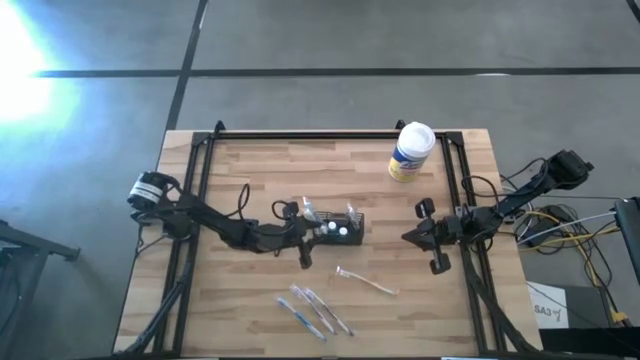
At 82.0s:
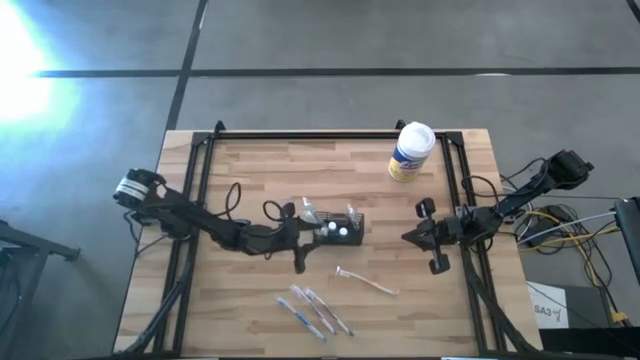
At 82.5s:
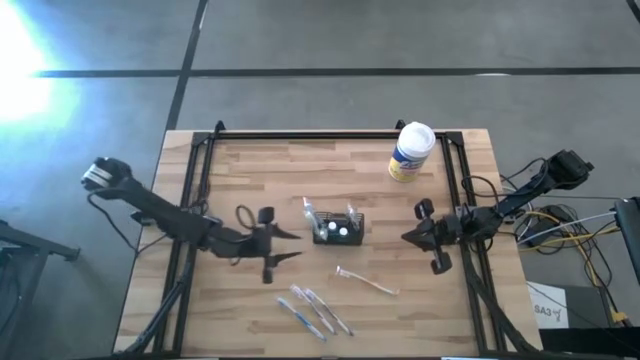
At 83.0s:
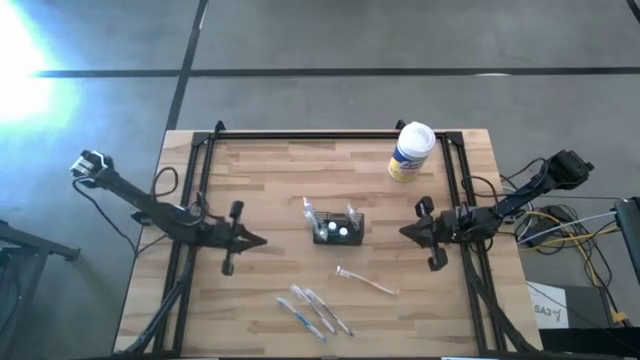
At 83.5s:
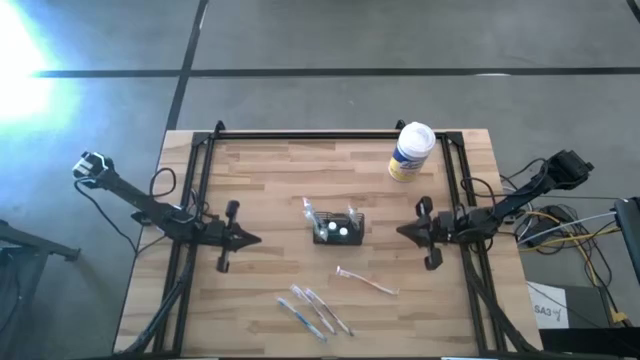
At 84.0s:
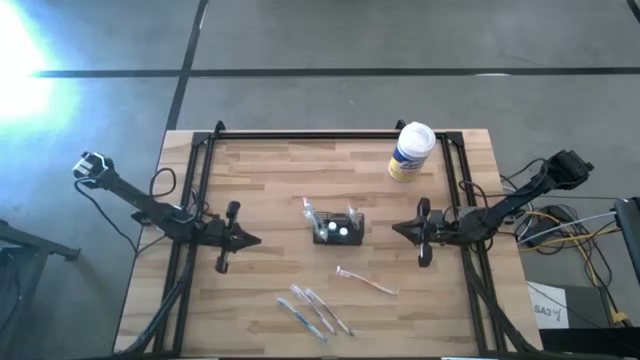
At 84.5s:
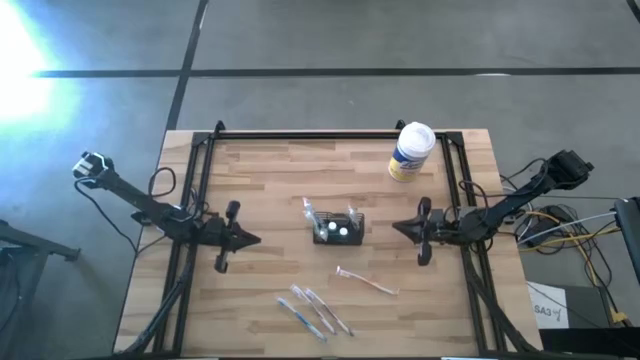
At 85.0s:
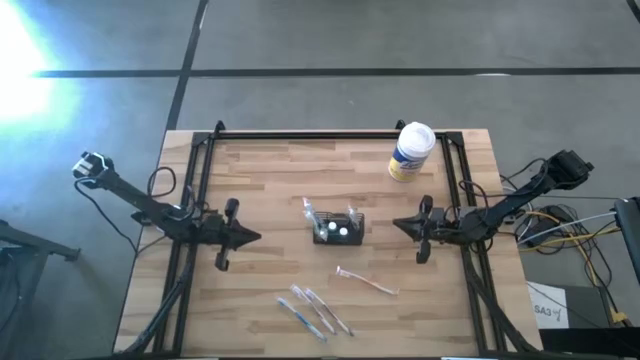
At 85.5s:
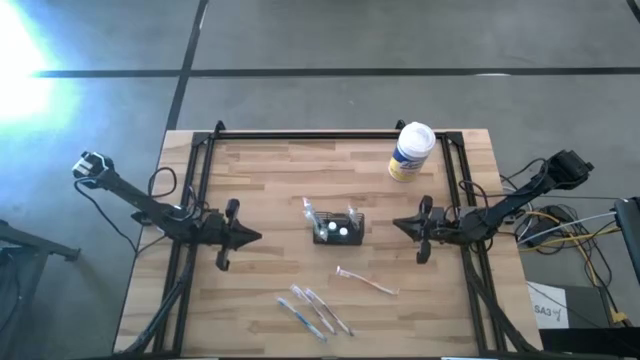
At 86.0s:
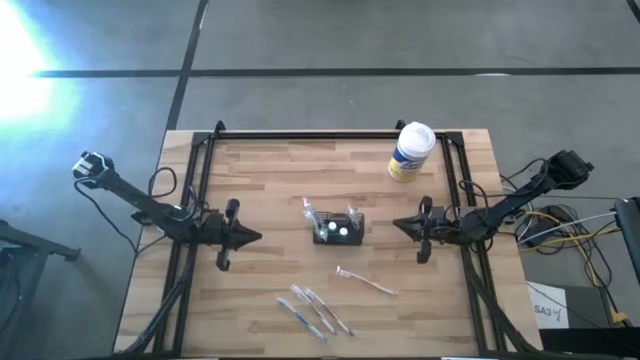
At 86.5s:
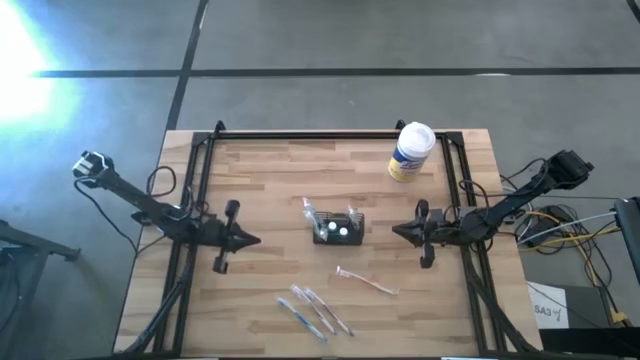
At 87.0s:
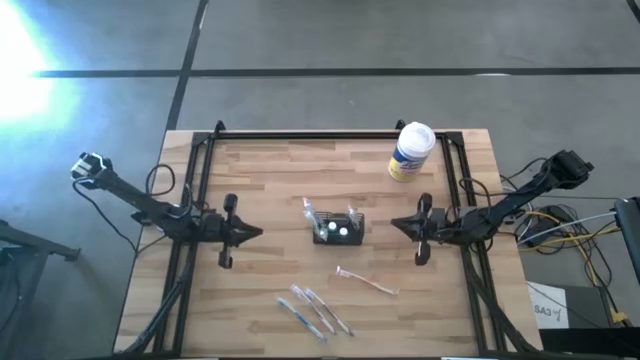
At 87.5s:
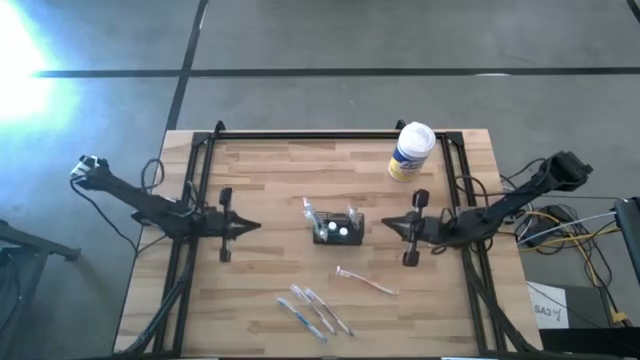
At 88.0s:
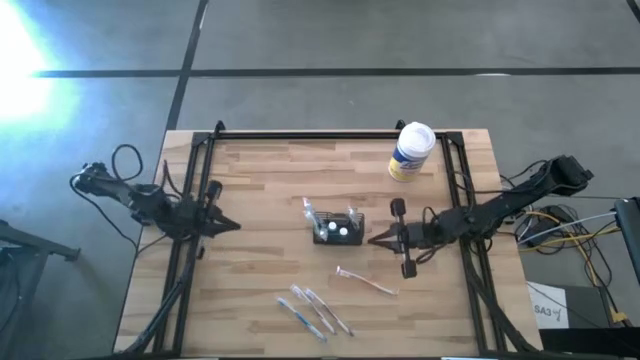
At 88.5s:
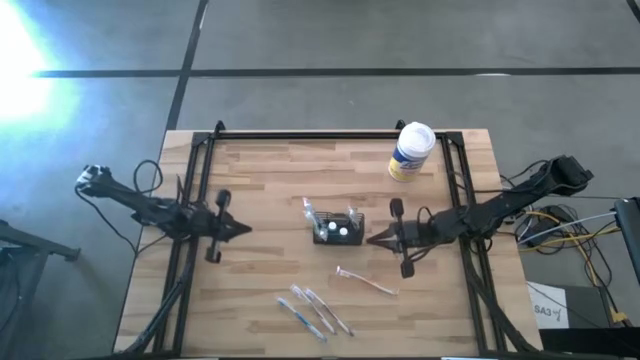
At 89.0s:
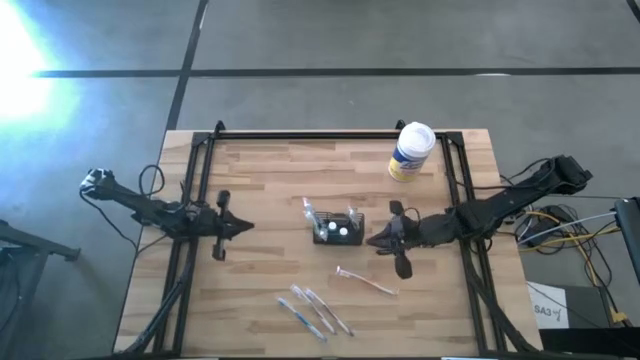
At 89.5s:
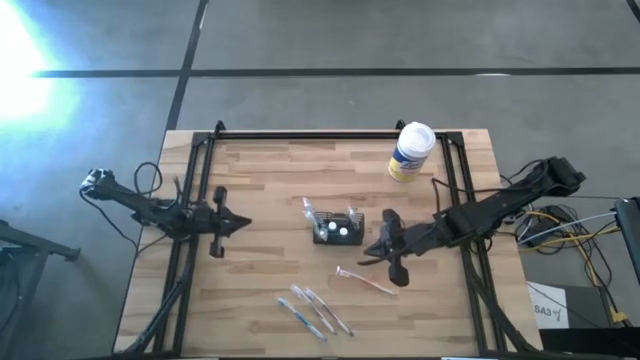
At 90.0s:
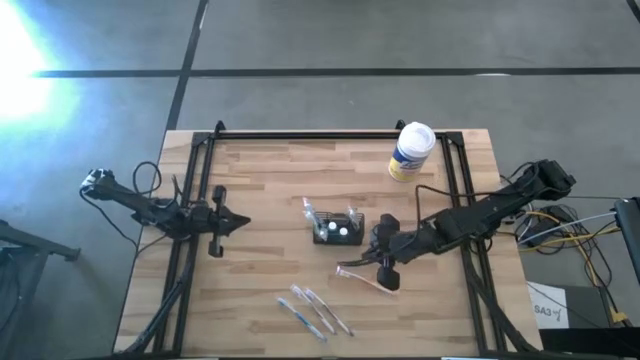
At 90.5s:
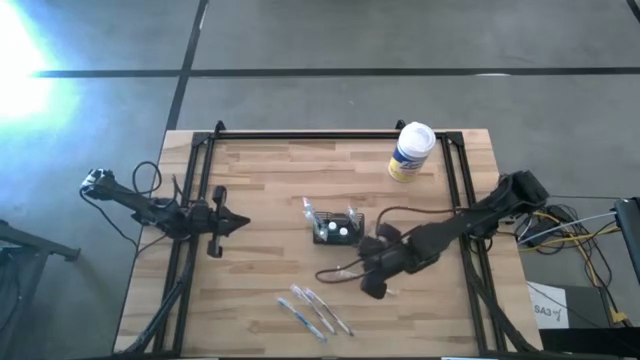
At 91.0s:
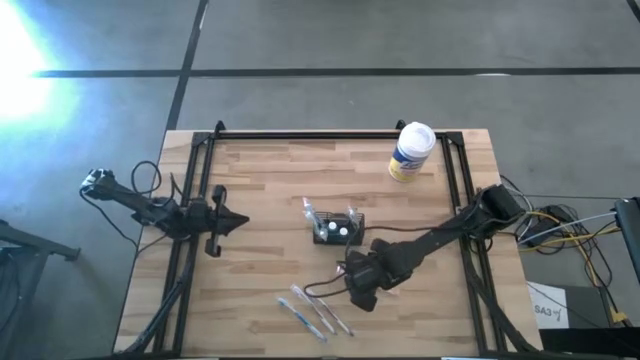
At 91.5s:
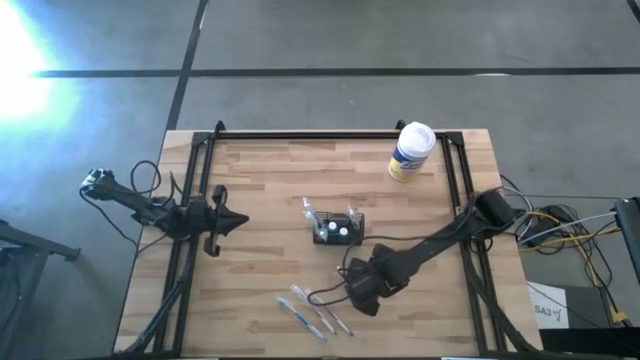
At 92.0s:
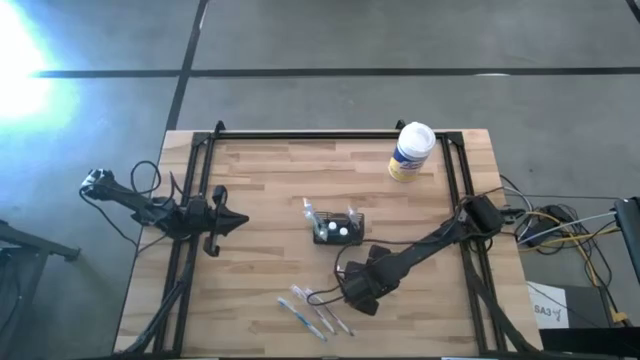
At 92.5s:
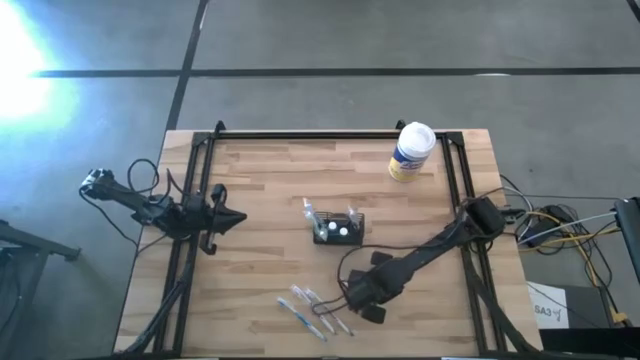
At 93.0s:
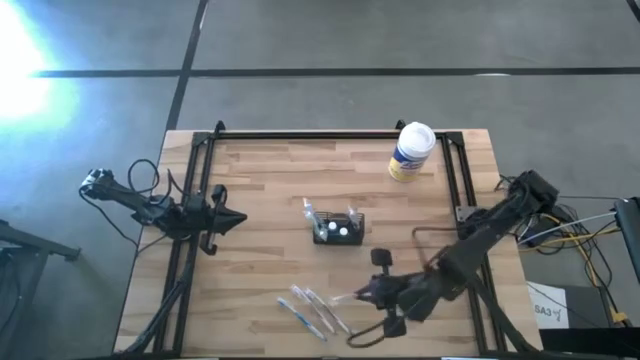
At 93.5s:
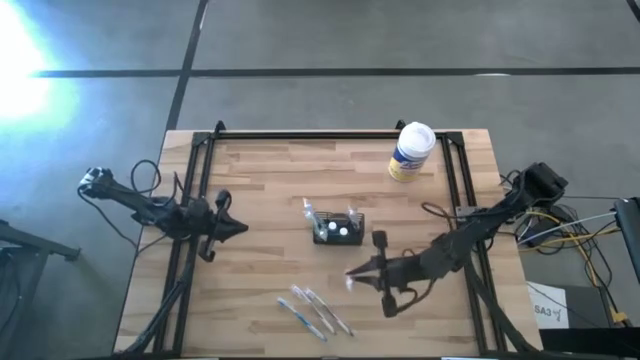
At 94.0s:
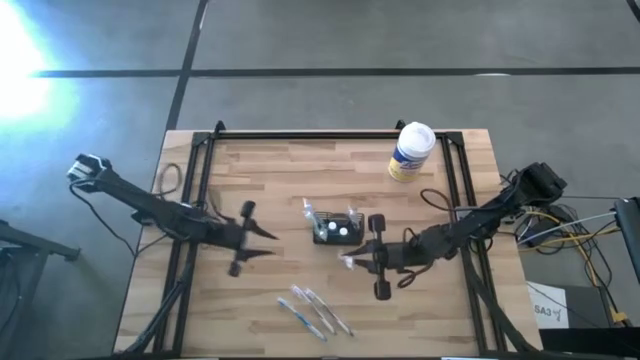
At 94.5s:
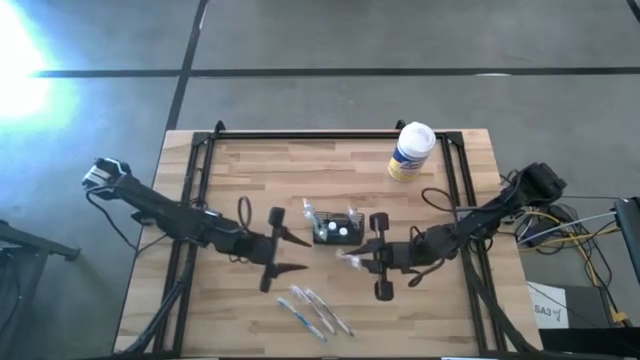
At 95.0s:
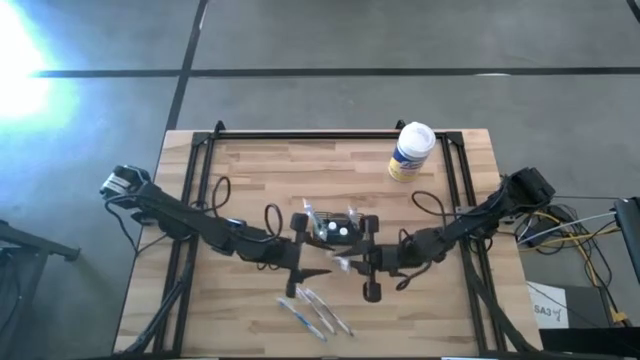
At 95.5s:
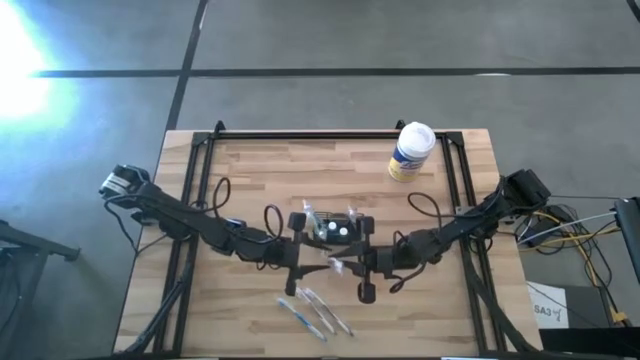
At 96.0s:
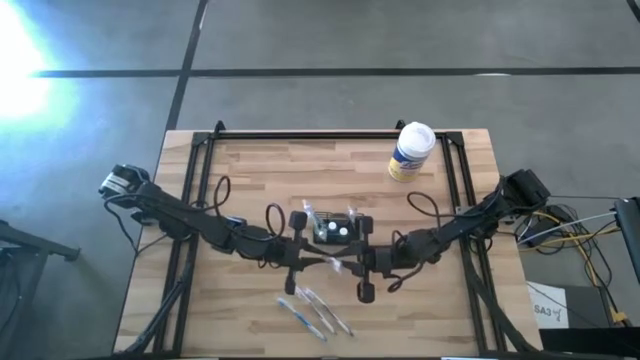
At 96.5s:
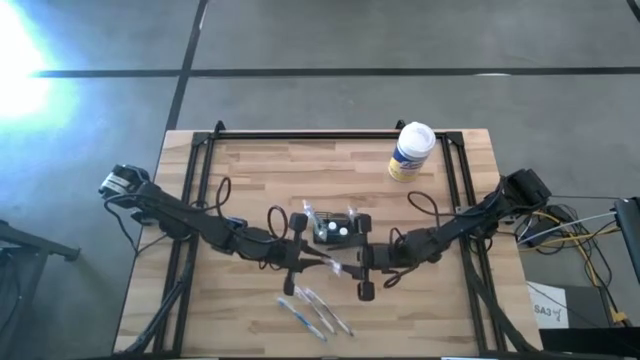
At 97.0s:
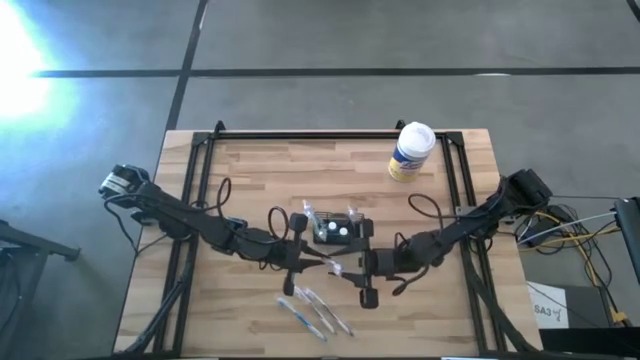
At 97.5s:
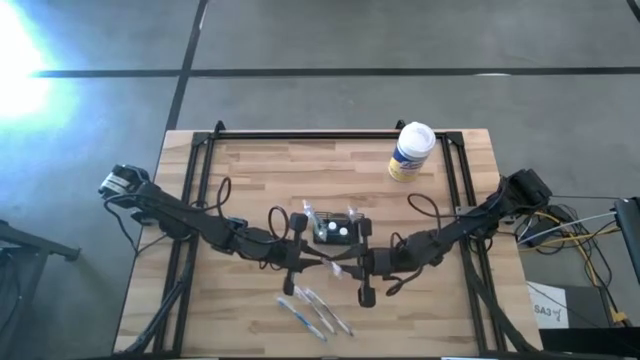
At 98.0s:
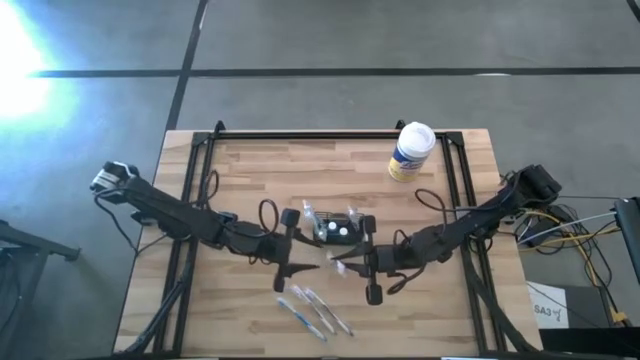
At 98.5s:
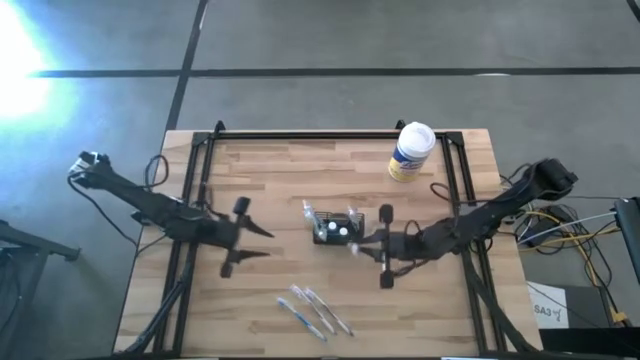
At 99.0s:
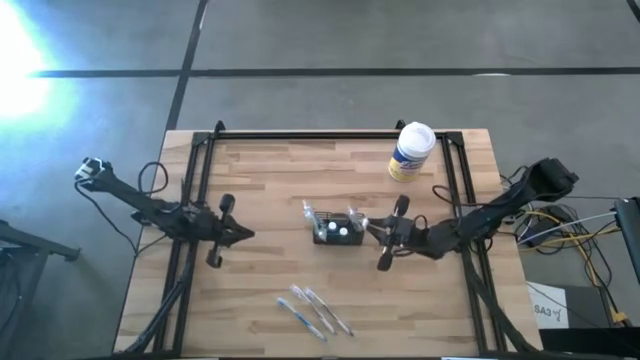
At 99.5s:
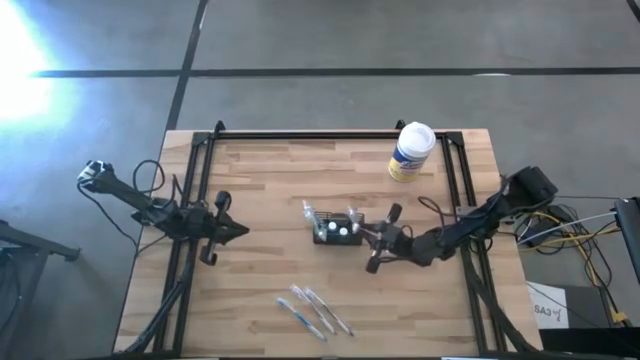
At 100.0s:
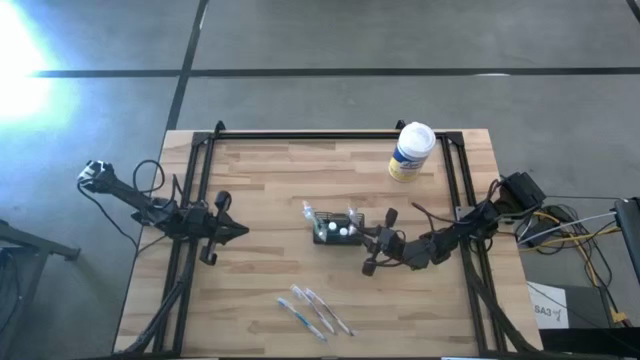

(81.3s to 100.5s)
Task: Pick & Place toothbrushing station
Put the orange toothbrush into the black mesh organizer

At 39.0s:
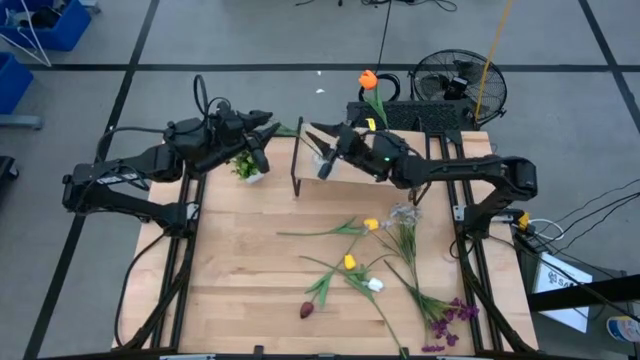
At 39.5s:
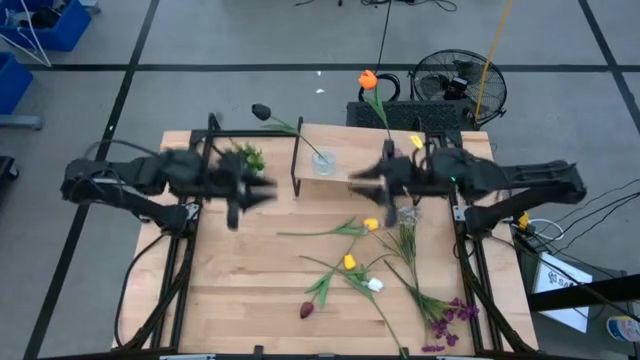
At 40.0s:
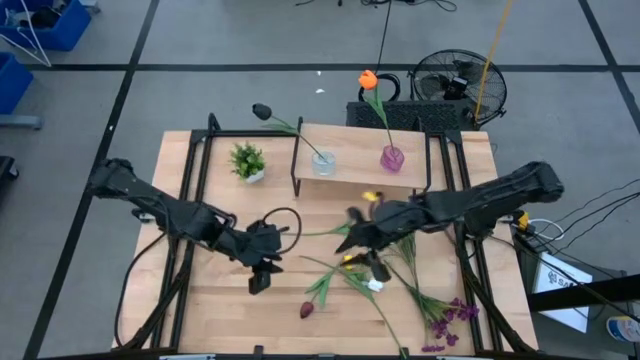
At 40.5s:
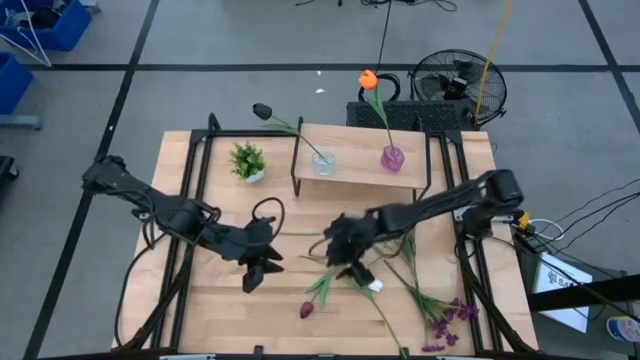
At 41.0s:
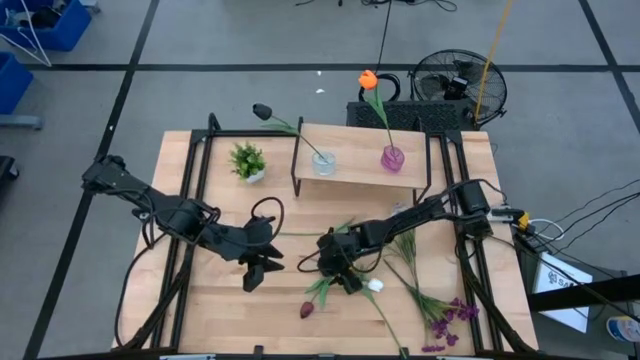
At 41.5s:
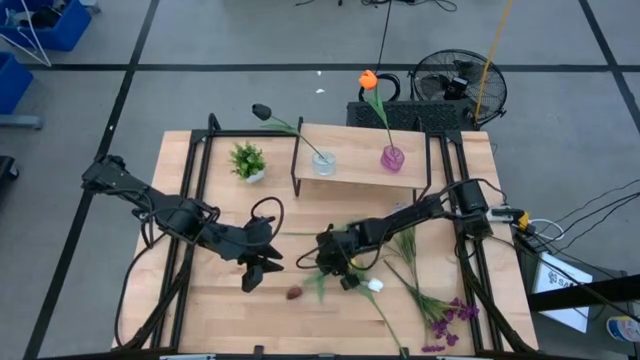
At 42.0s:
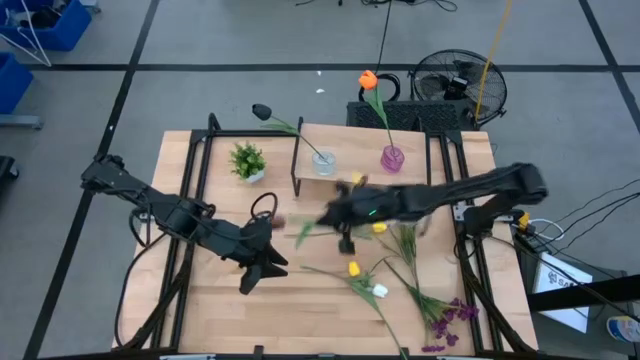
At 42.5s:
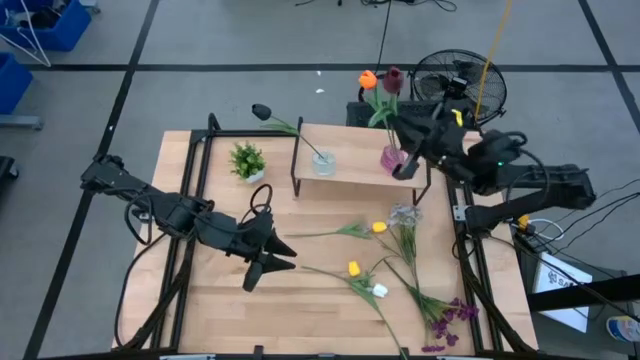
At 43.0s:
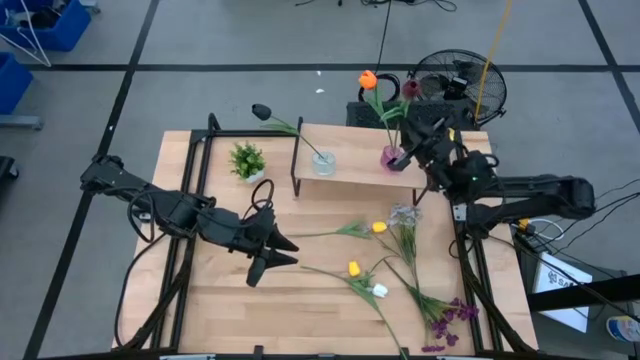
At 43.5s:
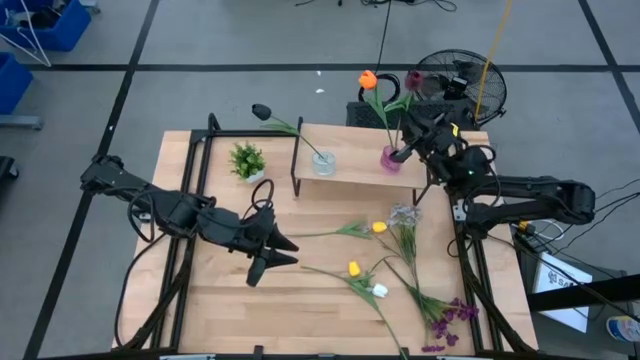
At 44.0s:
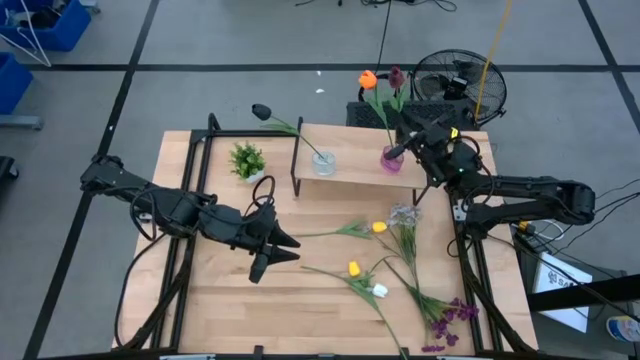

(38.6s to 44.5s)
Task: Pick and place flowers into a vace then onto a shelf
Put the red tulip into the purple vase
